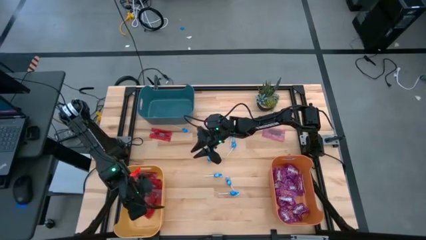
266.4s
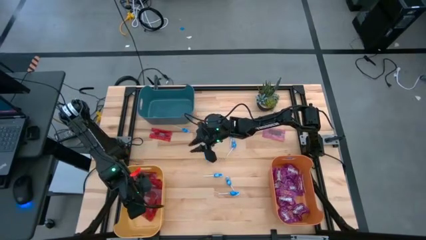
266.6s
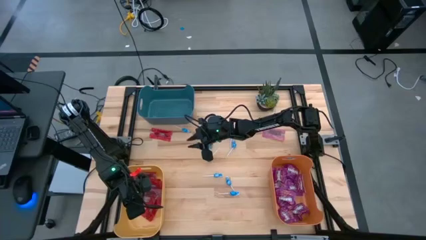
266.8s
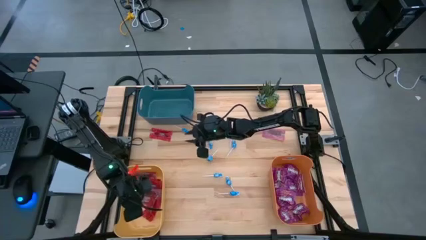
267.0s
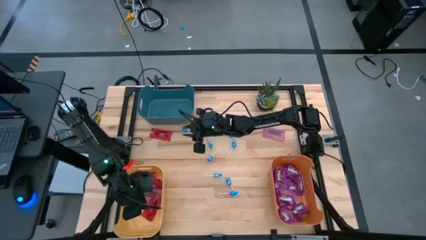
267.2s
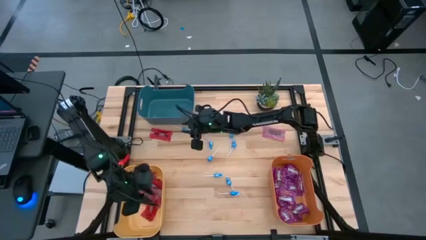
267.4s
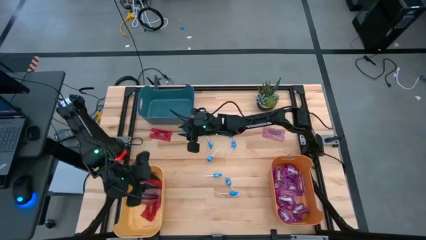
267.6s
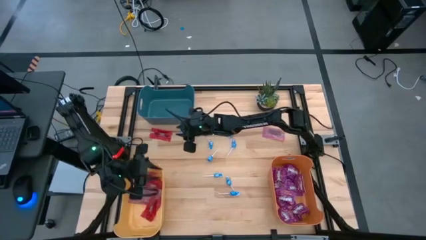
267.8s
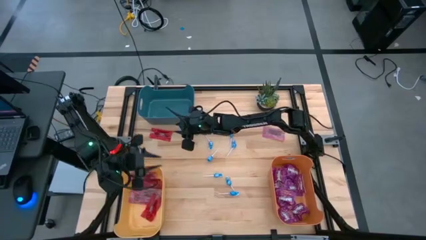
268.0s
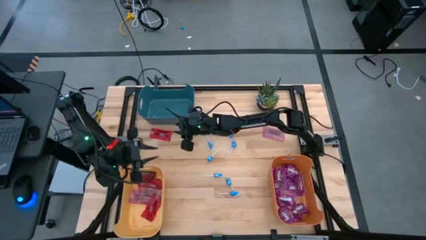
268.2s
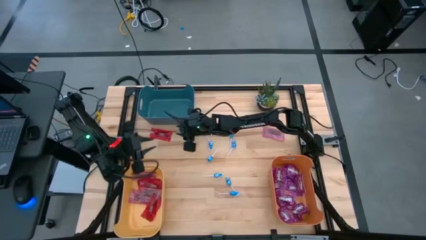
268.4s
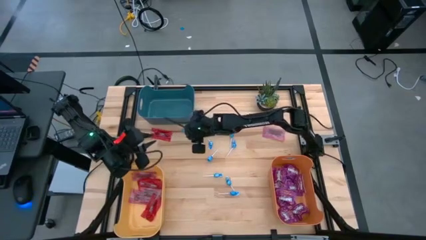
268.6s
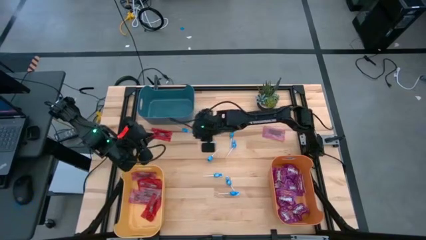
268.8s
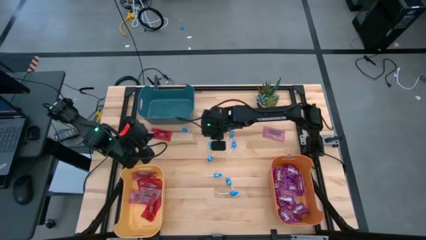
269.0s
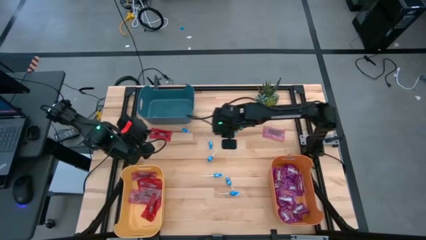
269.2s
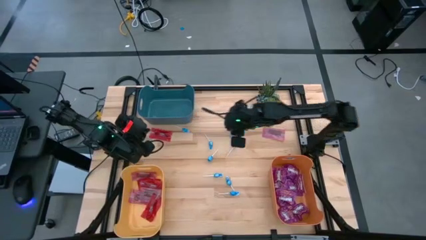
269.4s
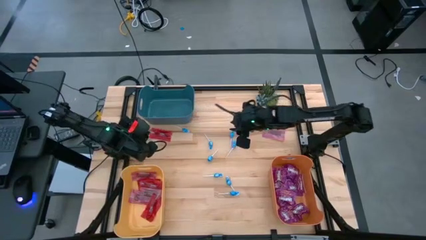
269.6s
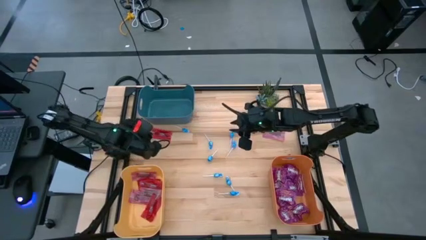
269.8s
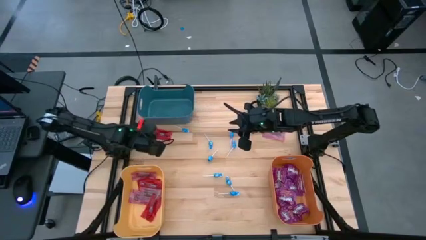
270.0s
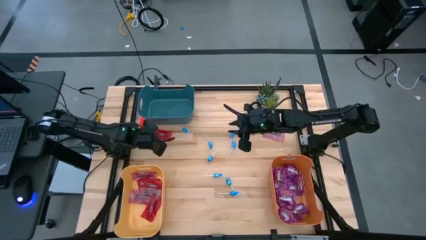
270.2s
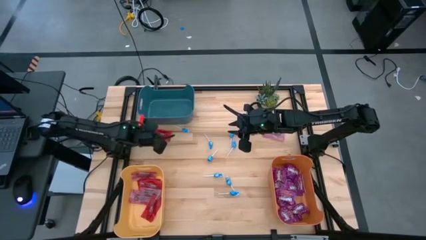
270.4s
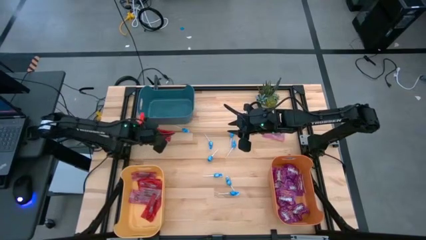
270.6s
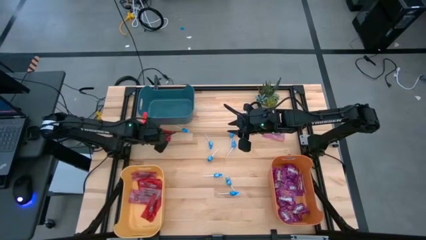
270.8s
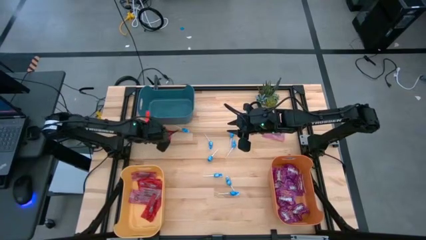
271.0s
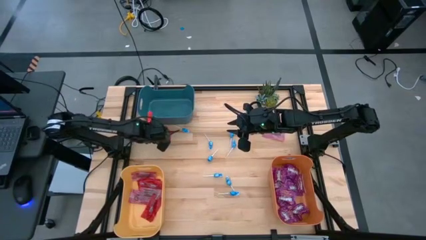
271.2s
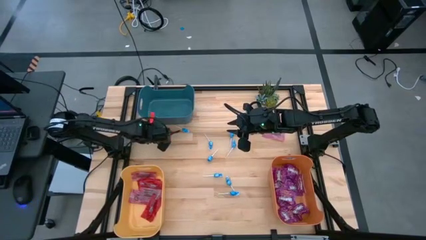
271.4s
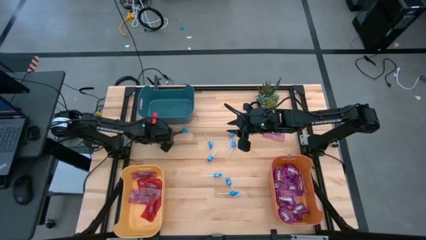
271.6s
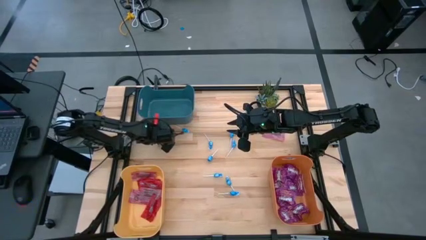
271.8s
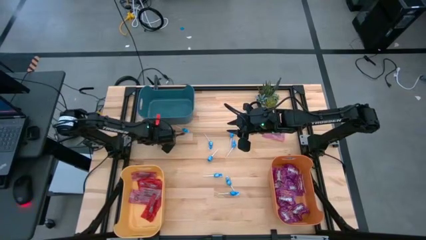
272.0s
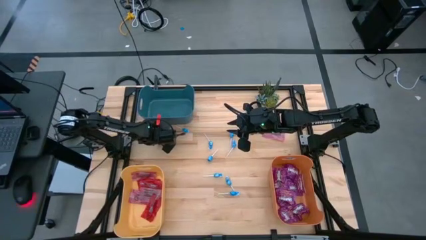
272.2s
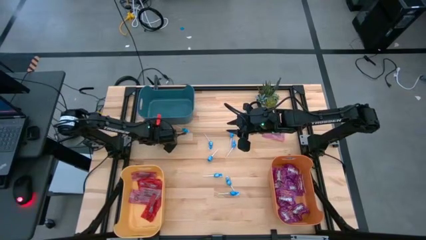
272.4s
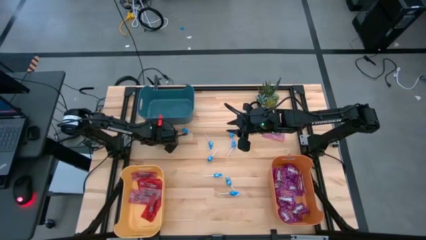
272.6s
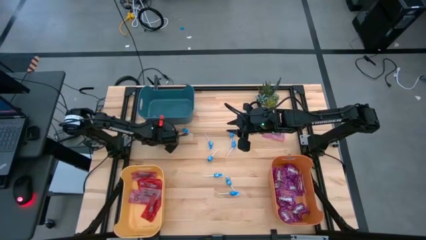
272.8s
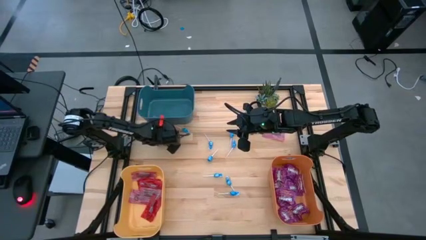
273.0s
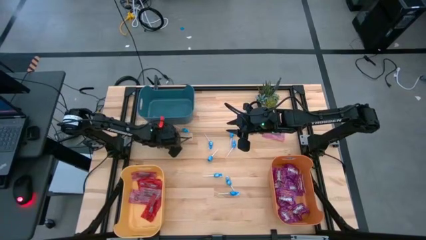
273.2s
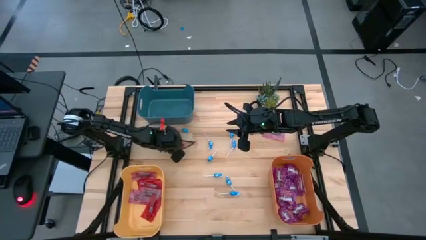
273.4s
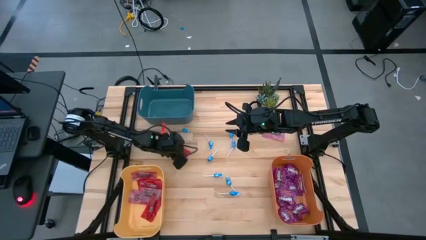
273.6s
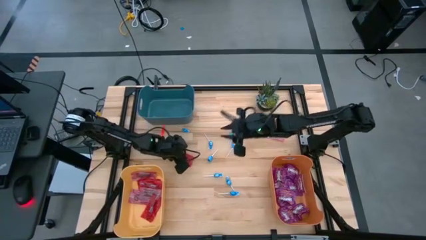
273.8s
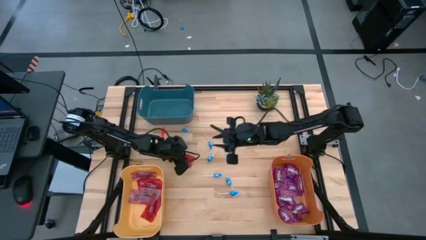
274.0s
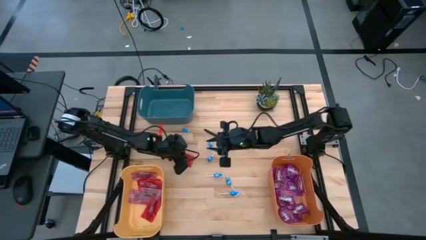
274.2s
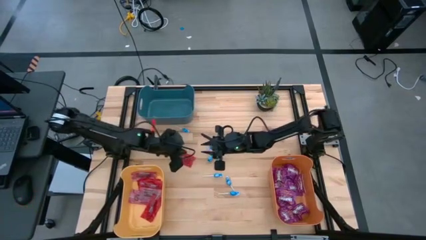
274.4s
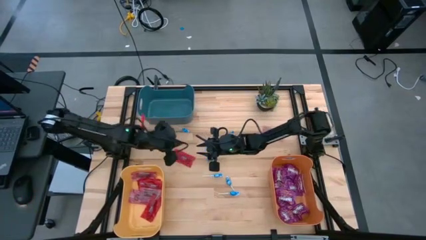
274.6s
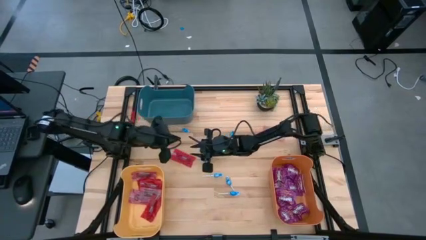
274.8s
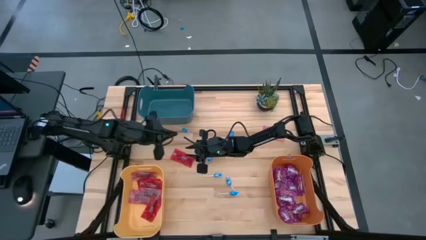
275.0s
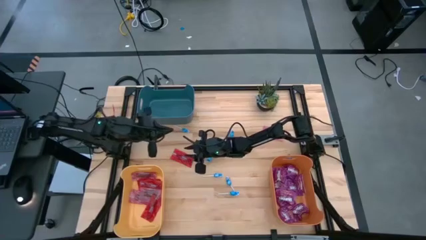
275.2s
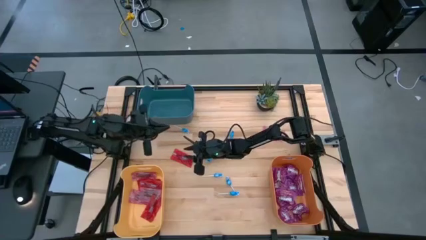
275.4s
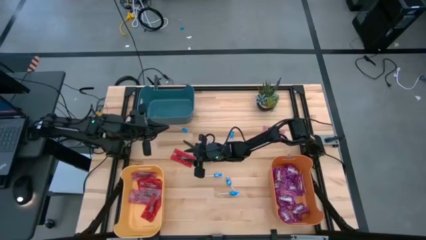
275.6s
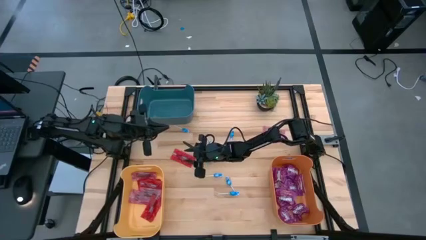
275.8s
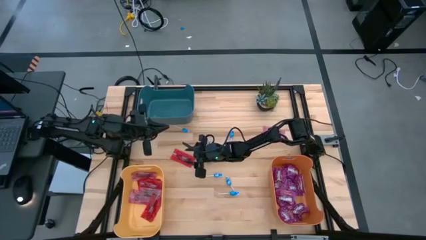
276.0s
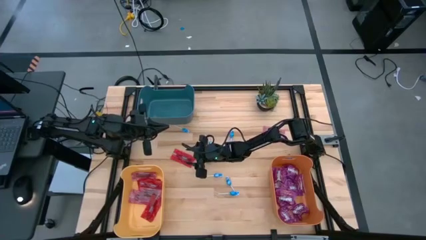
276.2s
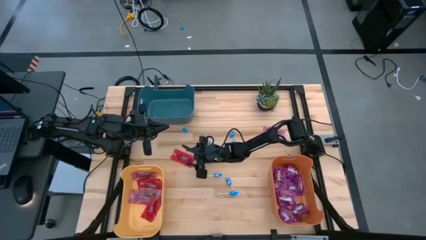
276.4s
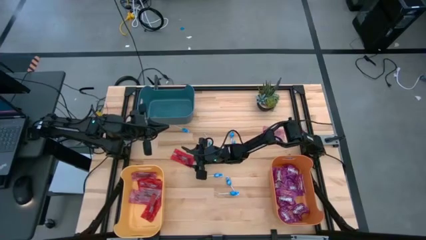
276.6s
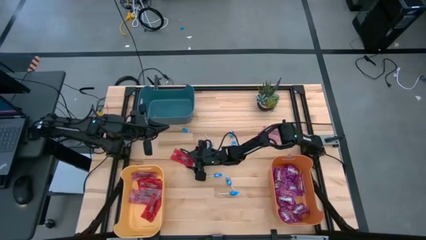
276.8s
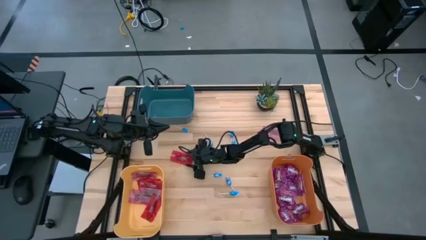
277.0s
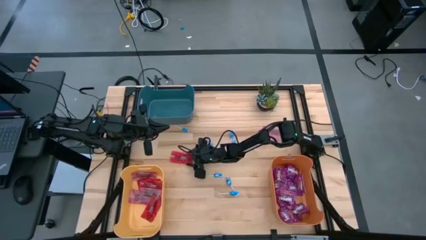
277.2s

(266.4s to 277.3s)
Task: Sort candy
Put the red candy into the yellow bin

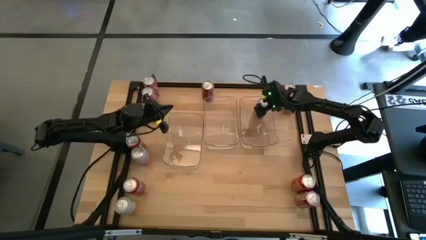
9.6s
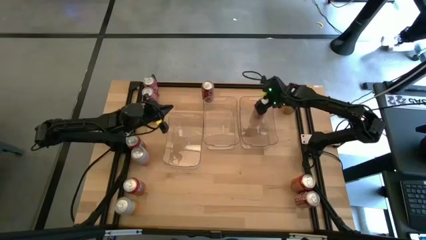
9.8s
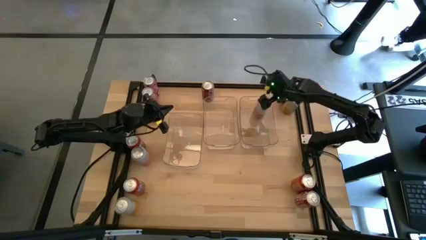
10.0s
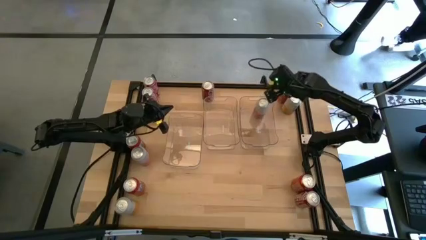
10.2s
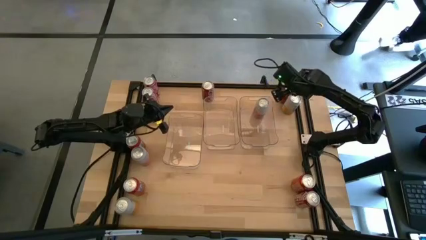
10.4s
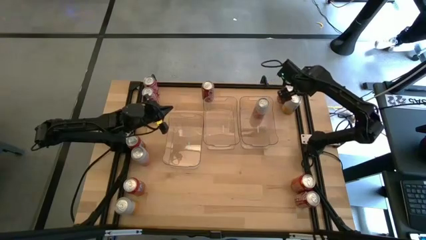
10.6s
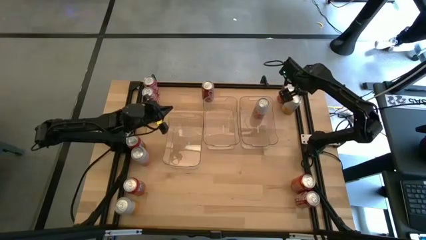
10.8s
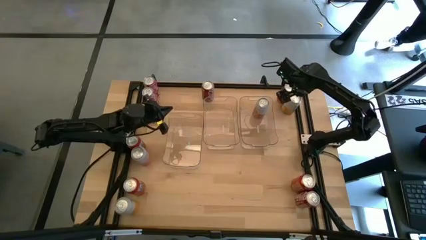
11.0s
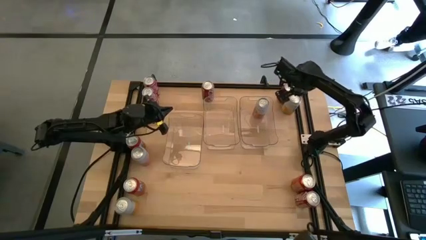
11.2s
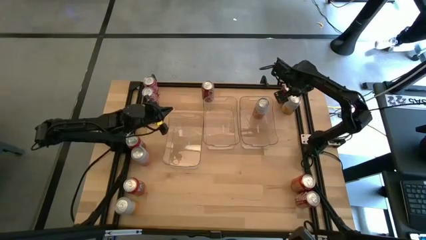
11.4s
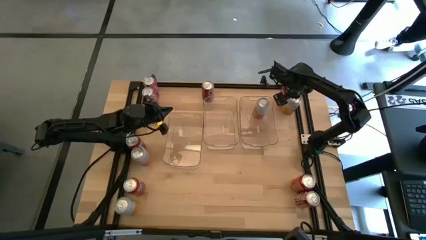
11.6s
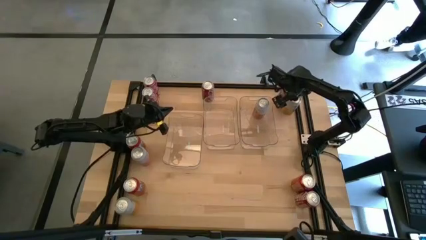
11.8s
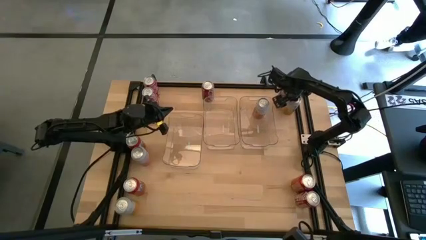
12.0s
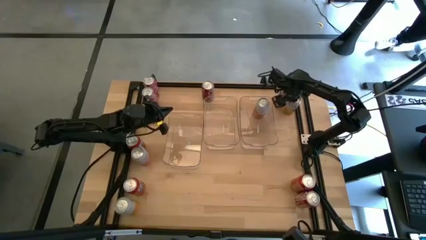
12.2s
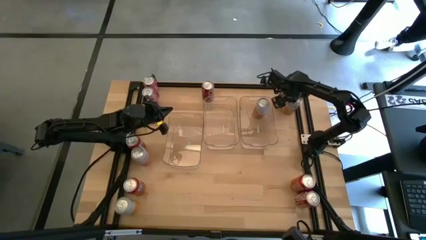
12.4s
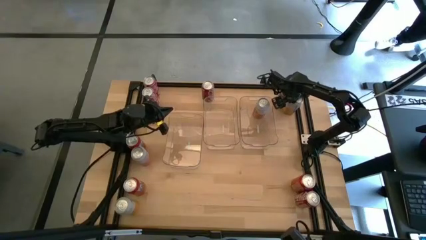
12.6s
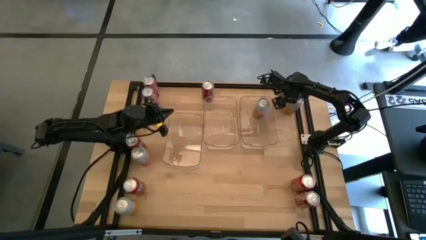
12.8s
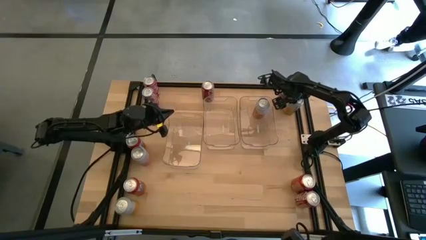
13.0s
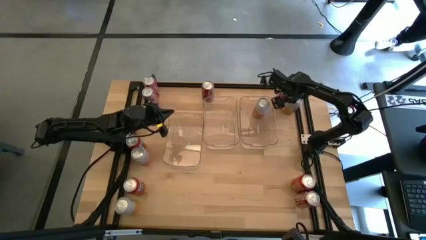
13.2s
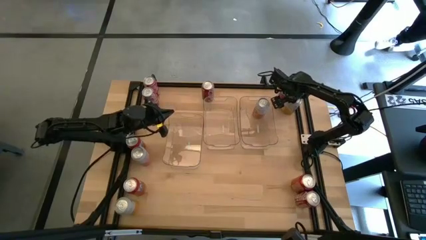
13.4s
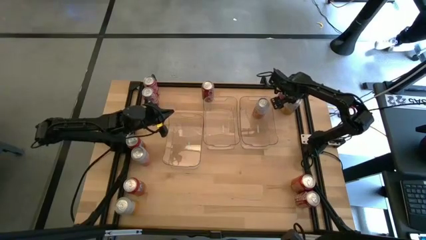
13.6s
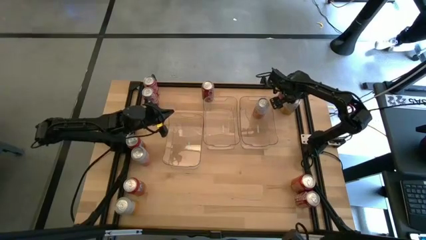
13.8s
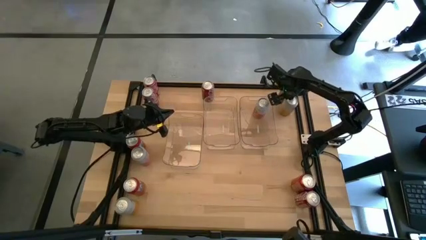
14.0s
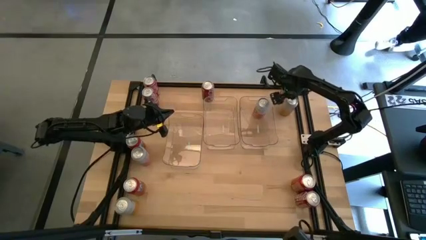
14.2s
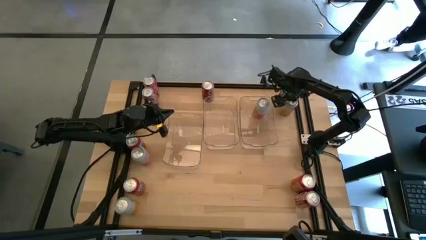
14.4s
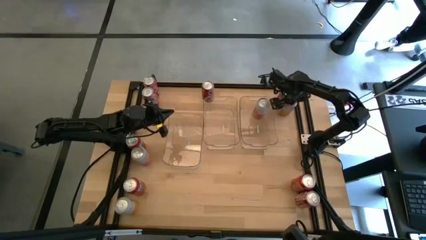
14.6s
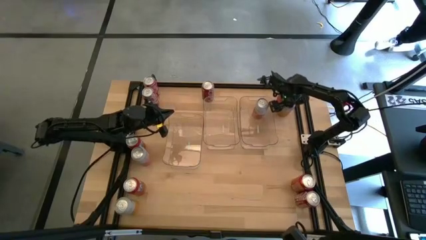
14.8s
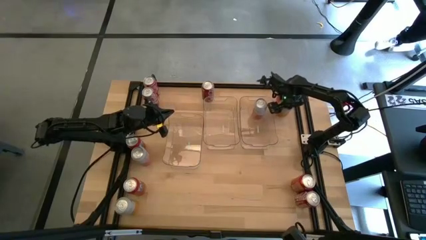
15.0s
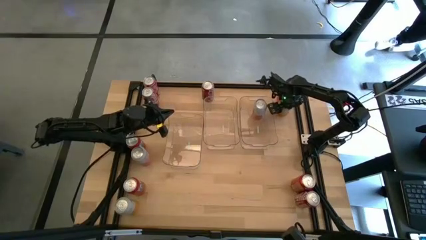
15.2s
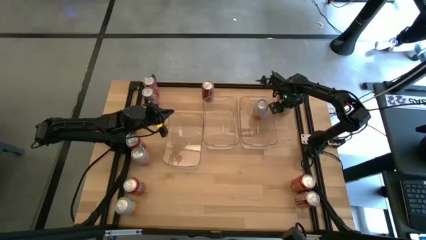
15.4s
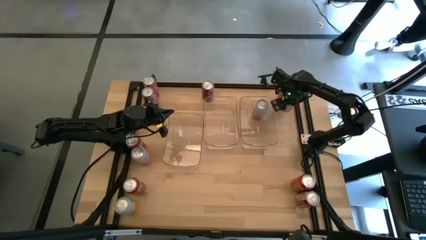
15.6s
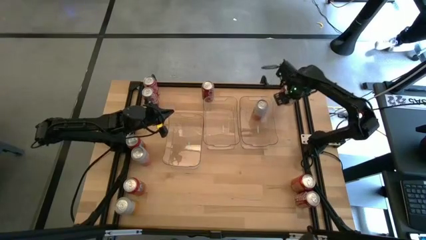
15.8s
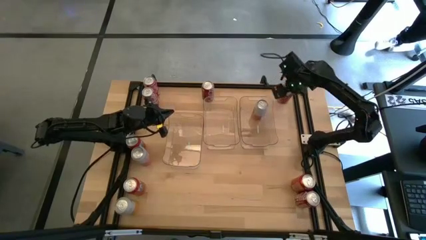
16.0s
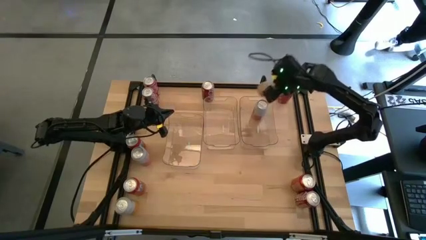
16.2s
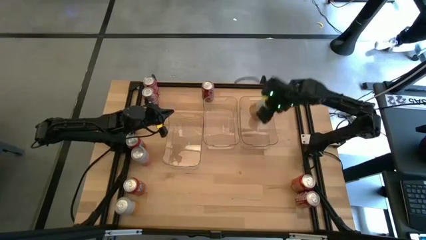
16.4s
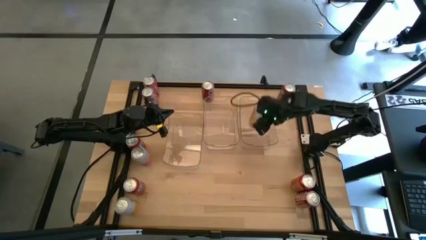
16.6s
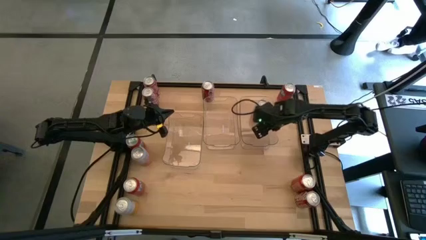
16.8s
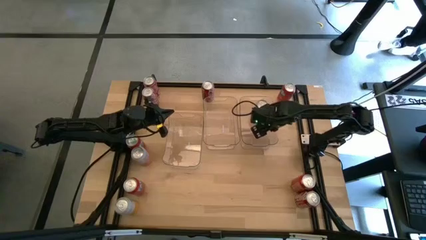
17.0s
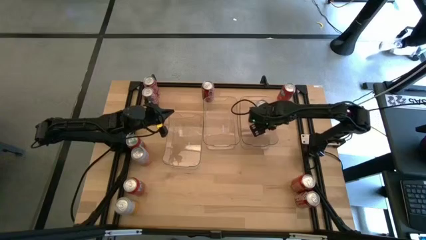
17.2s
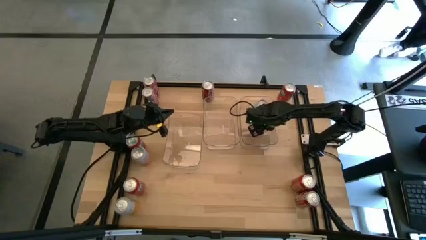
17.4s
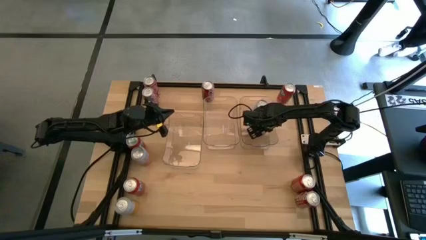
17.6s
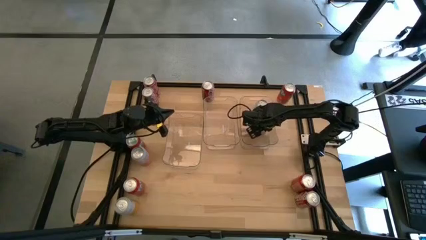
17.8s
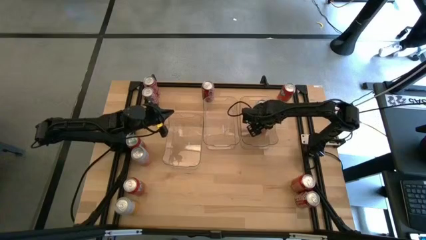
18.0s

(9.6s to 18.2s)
Task: Sort soda cans
Put the top white soda can into the right transparent bin
